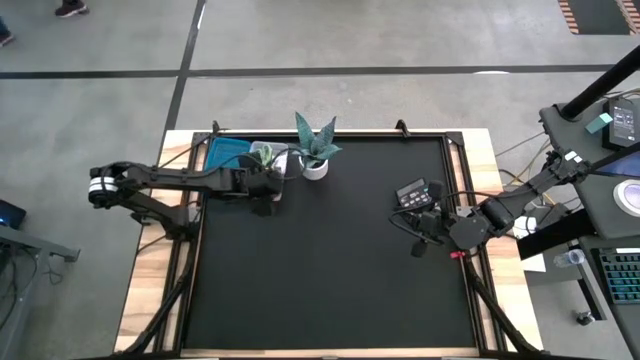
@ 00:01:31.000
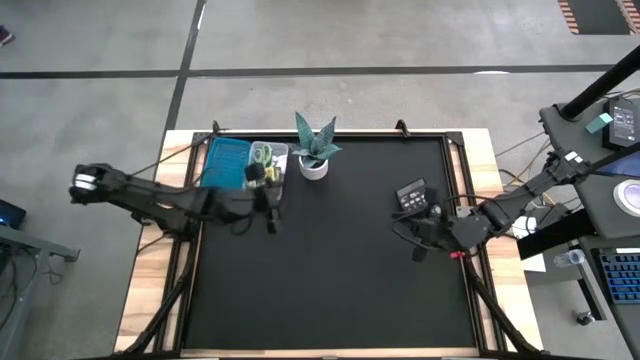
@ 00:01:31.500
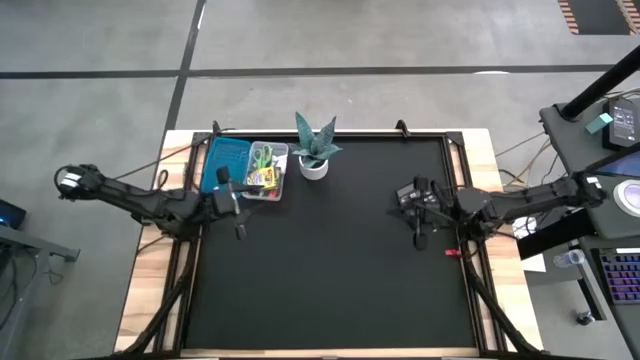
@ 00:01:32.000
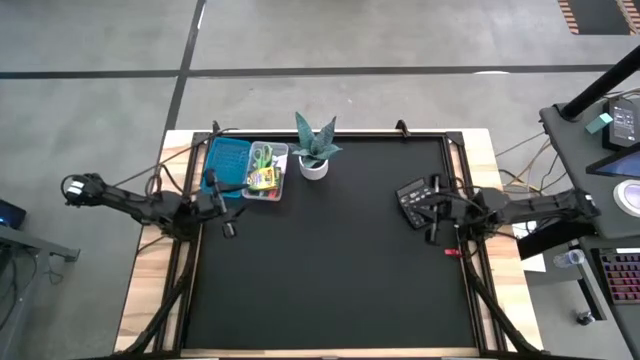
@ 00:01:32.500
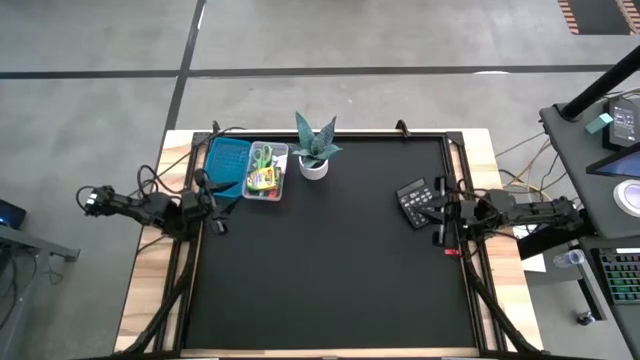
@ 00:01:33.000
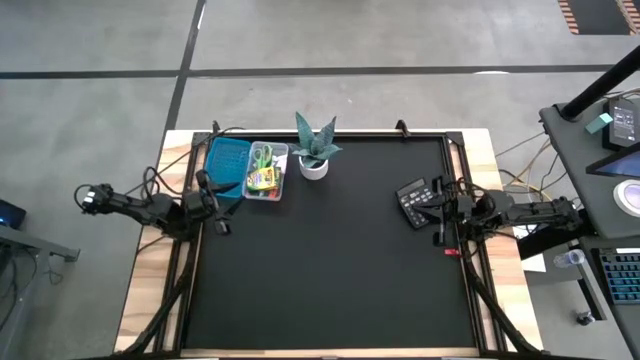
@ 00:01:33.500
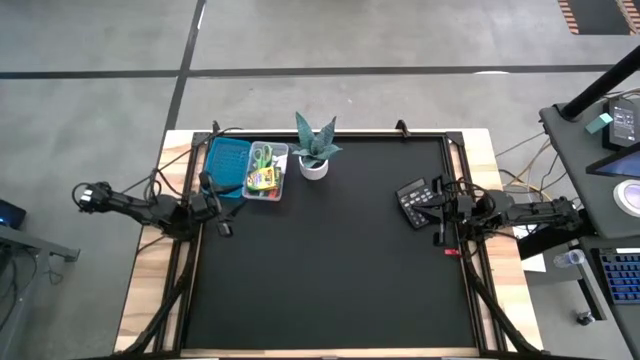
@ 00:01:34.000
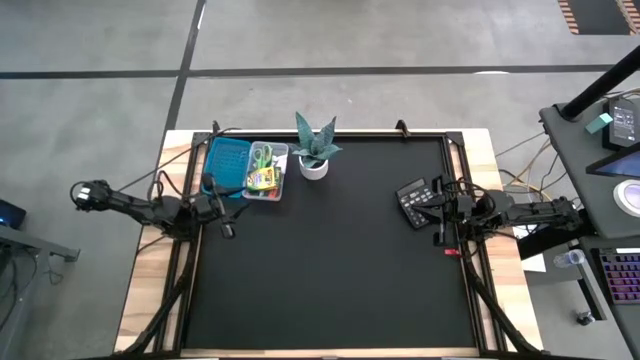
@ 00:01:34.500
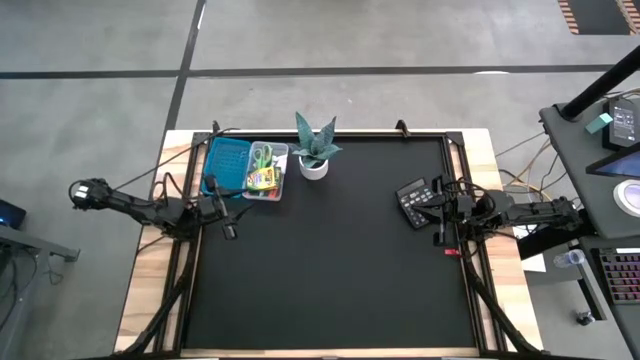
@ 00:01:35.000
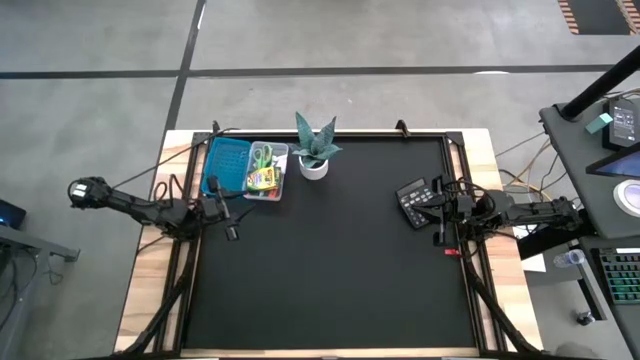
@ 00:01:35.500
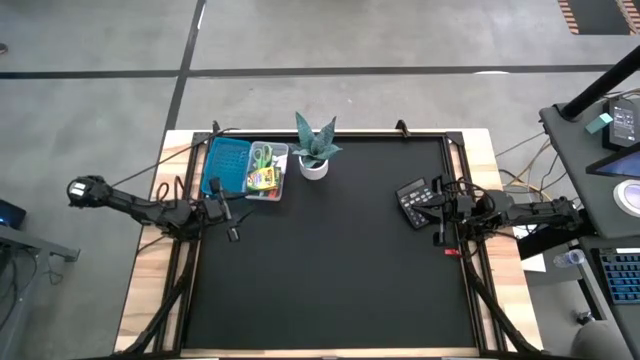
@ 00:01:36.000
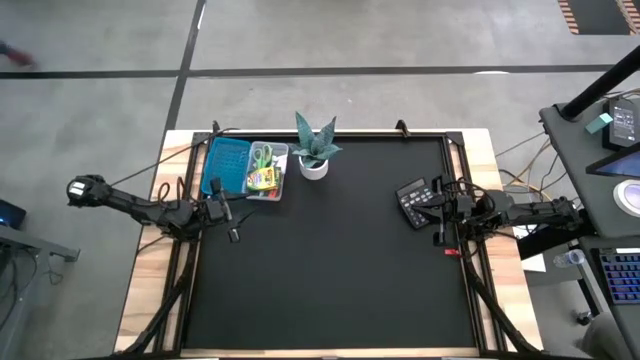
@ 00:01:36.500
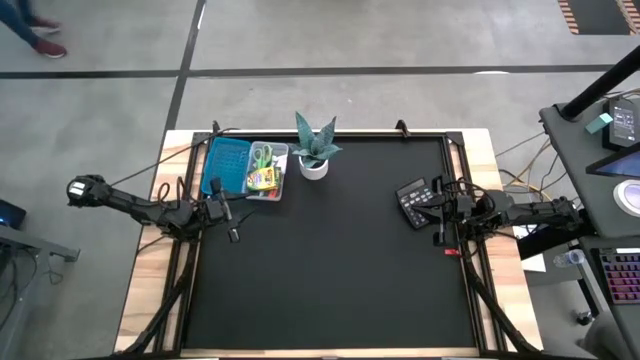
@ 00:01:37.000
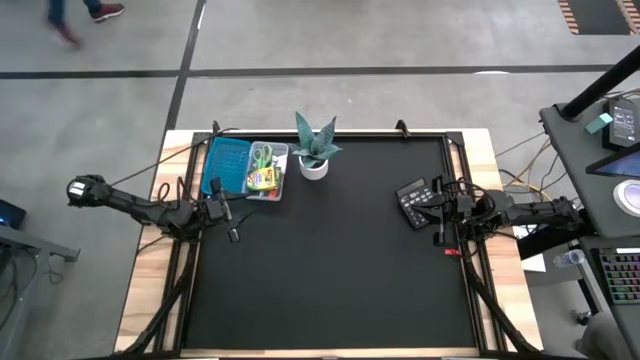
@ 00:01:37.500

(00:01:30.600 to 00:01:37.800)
Task: Pack school essentials
Return to Home Position

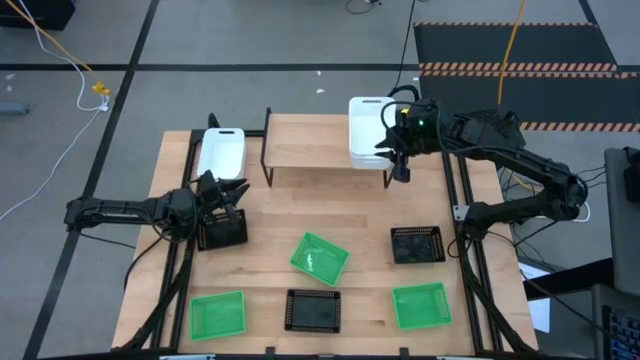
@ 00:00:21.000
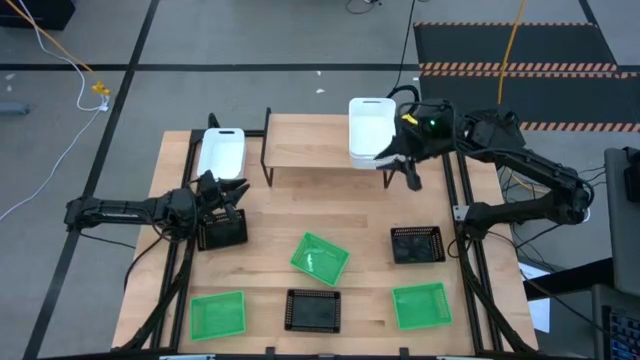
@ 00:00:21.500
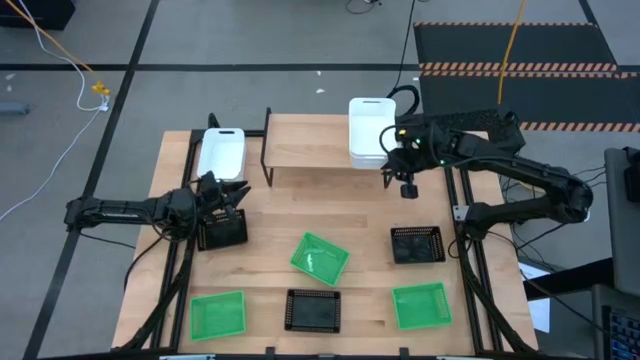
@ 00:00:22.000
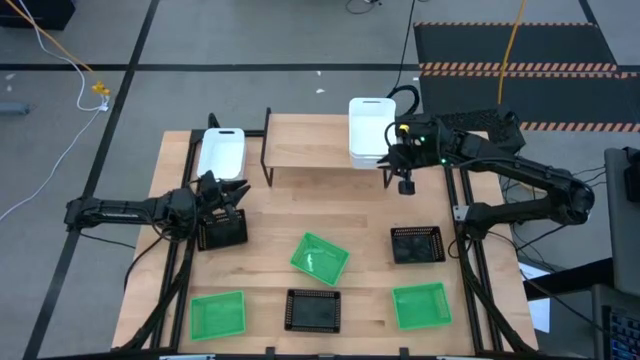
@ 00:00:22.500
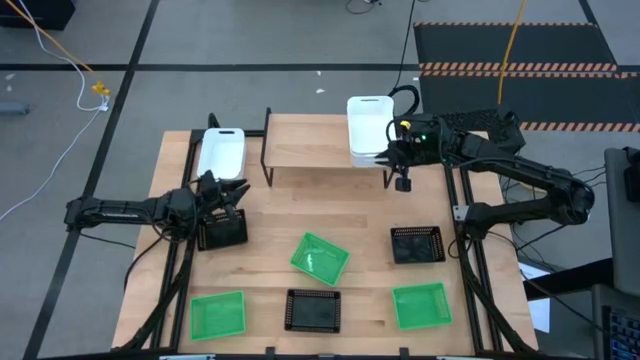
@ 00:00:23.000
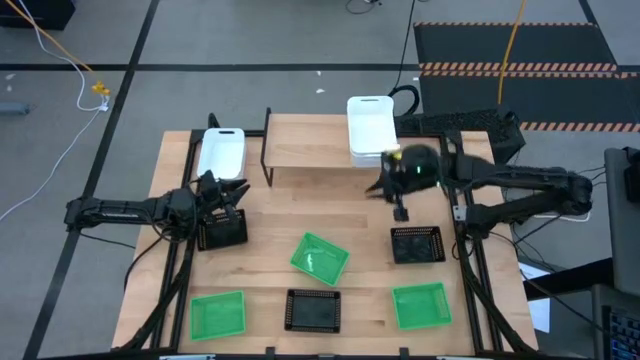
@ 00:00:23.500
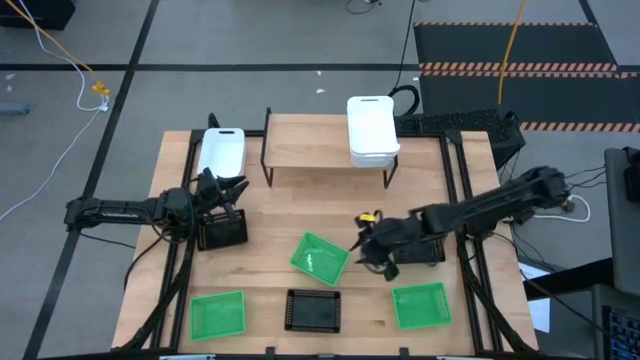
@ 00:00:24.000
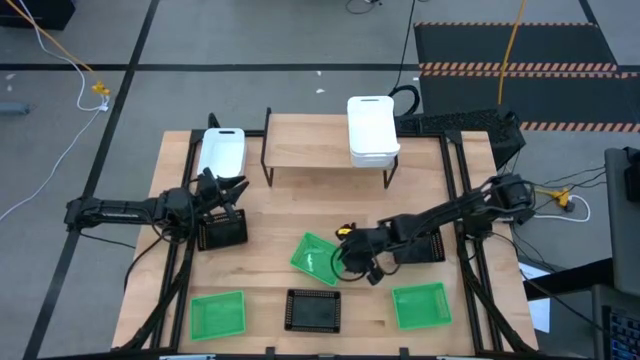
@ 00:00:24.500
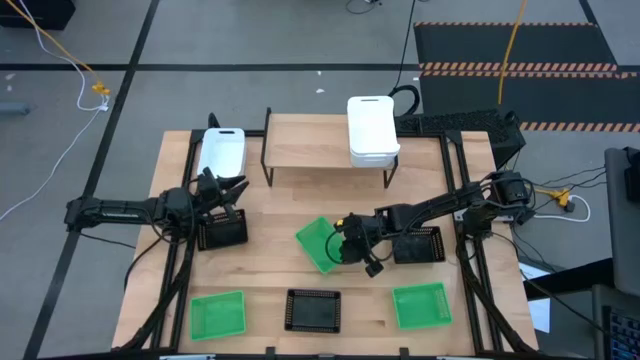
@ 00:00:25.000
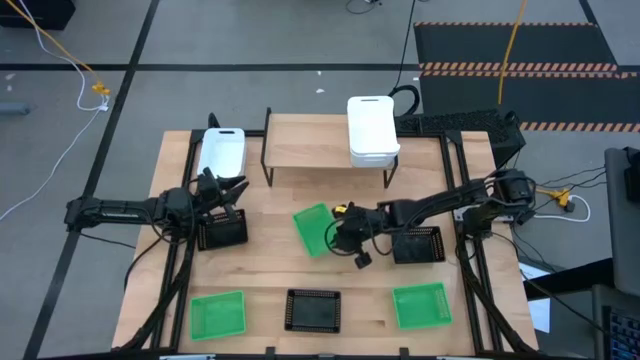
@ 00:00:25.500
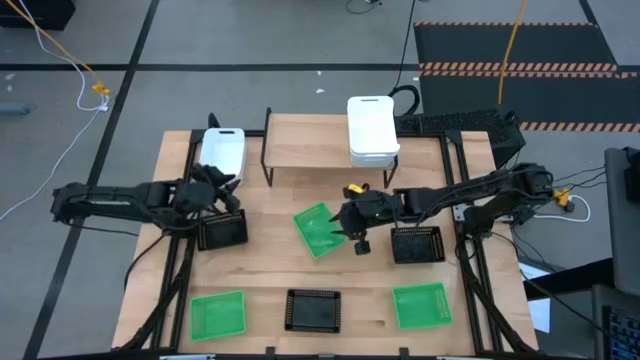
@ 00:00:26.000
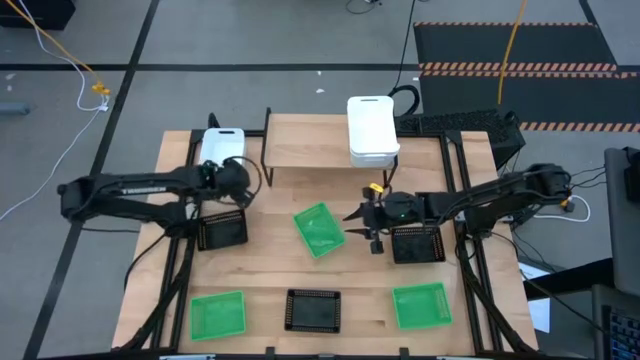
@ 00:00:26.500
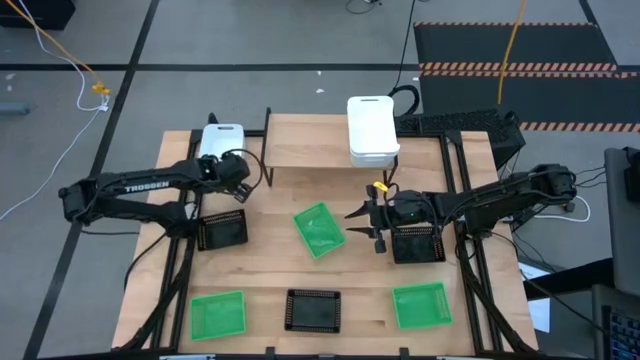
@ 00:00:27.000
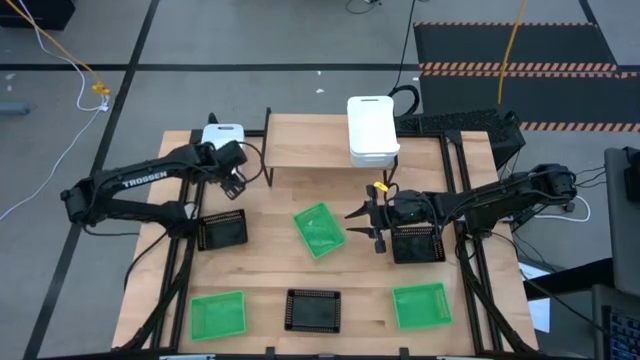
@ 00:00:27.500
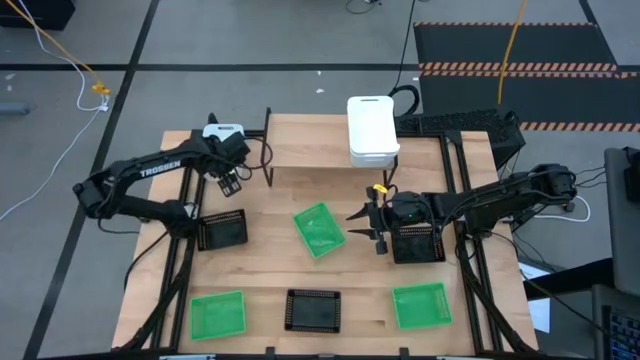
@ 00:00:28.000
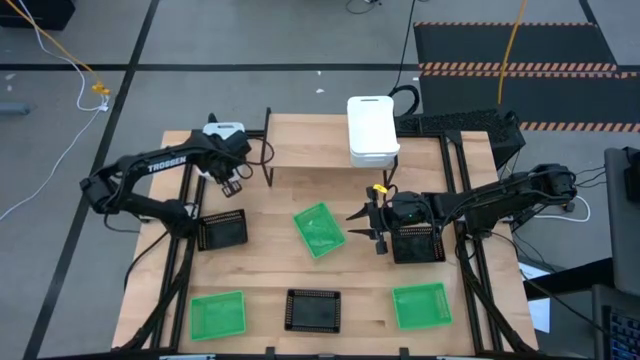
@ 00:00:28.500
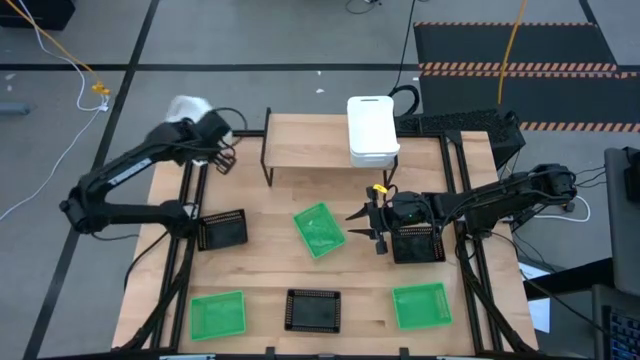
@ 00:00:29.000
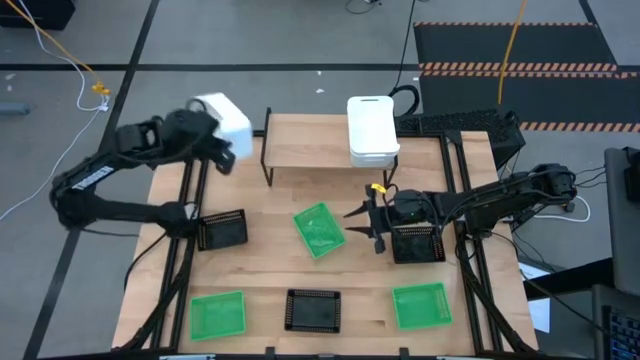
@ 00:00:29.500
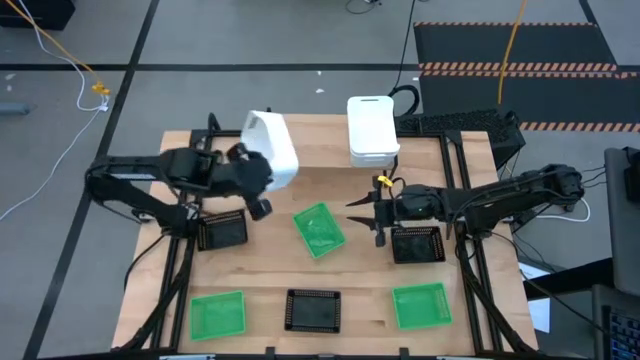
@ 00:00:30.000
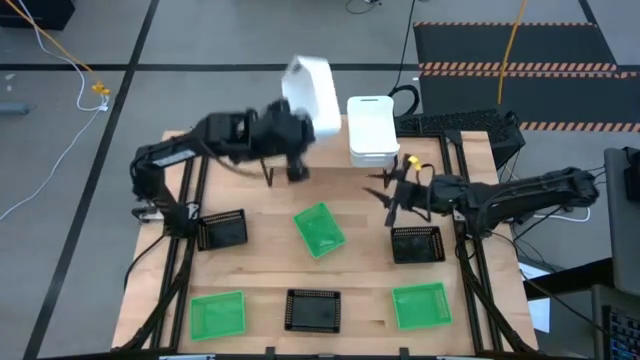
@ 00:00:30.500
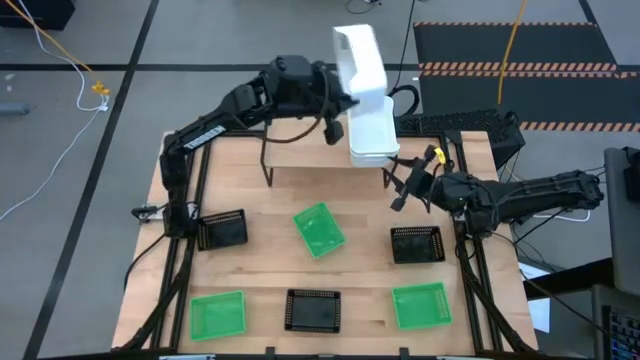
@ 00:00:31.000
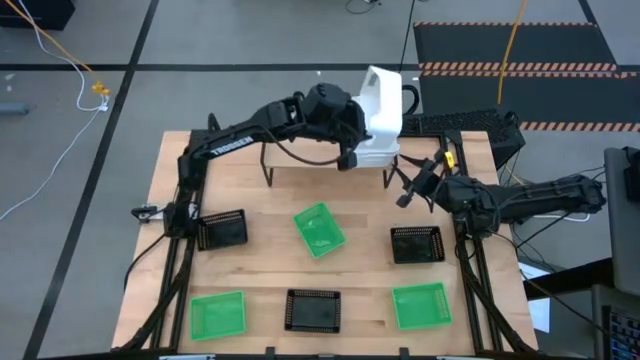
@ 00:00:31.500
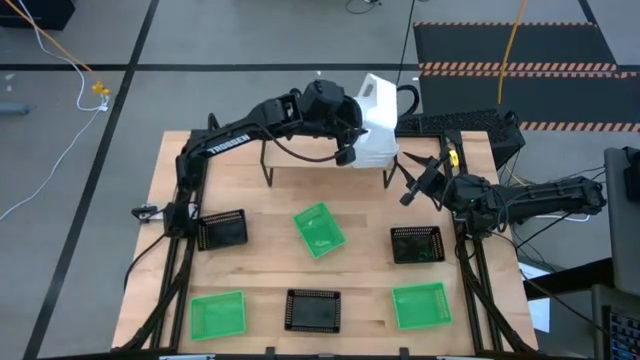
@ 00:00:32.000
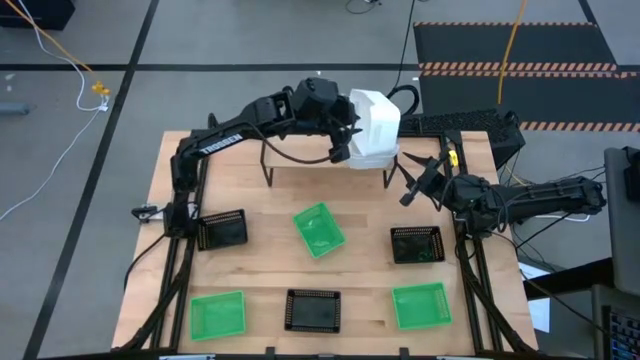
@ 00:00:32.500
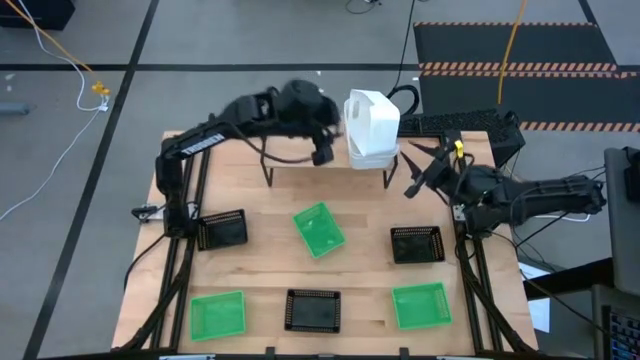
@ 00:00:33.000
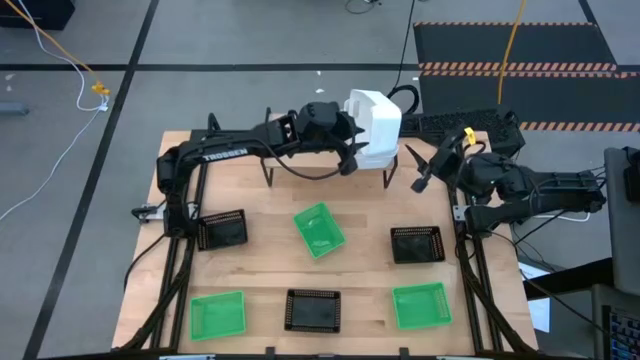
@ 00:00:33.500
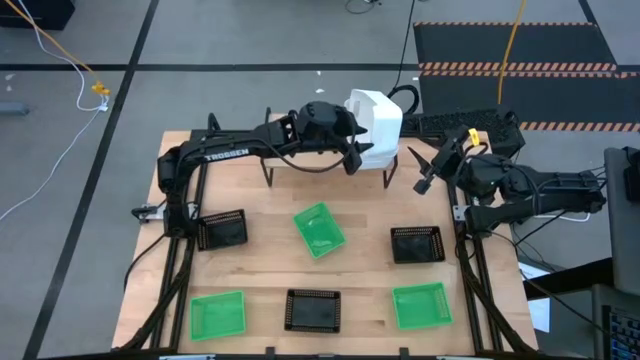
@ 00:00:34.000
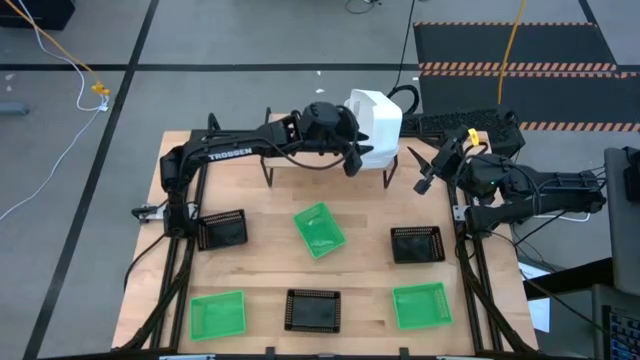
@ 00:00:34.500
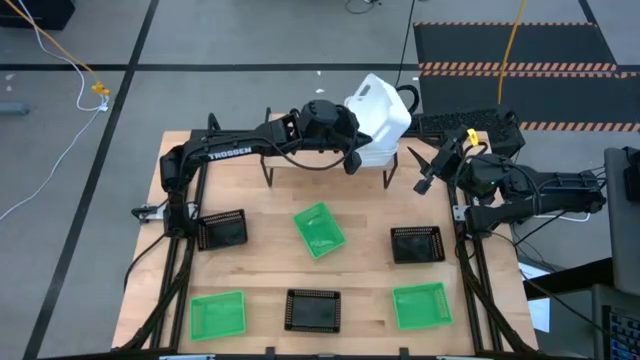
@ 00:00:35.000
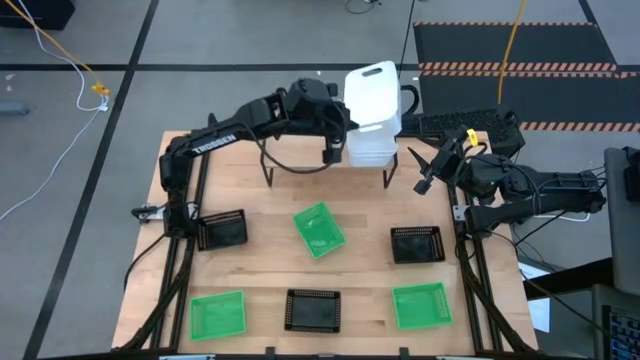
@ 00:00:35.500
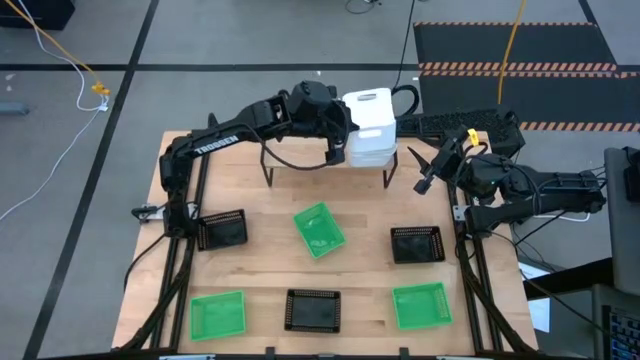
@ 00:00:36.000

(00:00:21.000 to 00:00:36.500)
Task: Stack baskets on shelf by color
Stack the white bin on top of the other white bin on the shelf
